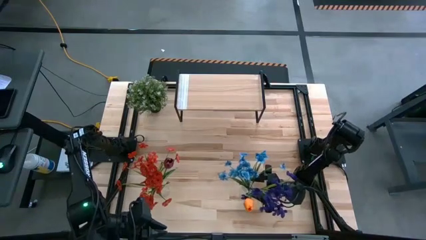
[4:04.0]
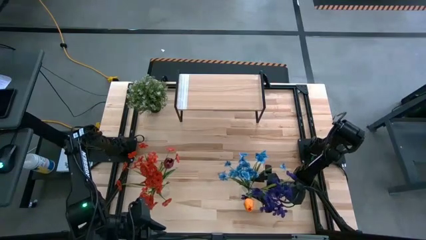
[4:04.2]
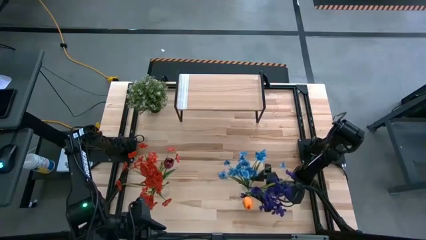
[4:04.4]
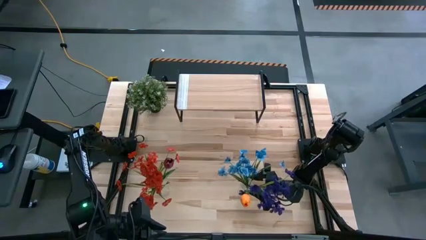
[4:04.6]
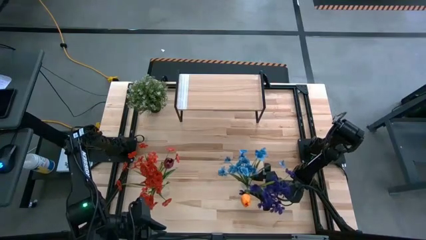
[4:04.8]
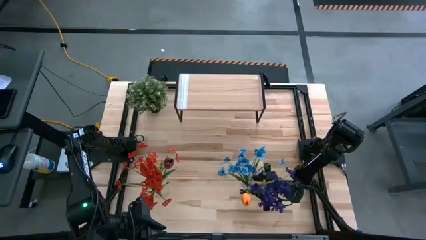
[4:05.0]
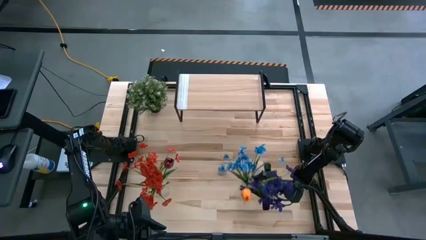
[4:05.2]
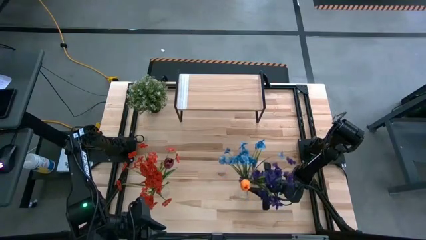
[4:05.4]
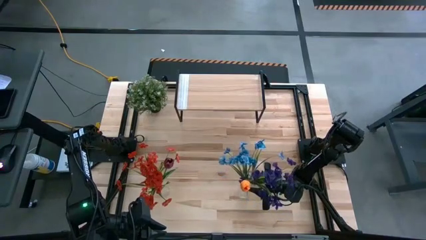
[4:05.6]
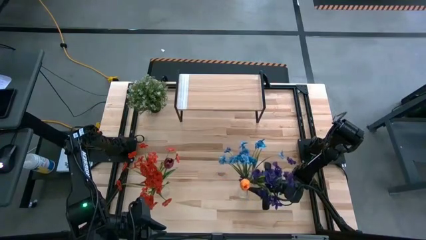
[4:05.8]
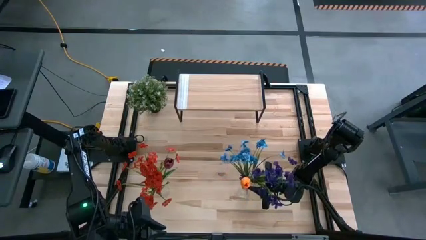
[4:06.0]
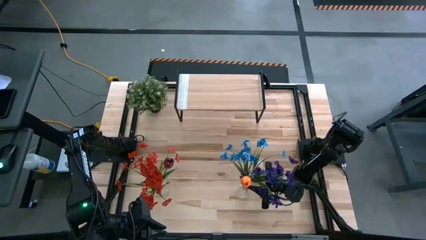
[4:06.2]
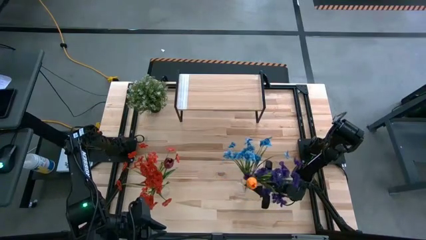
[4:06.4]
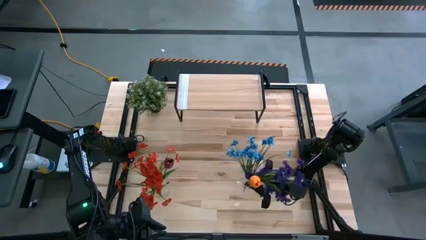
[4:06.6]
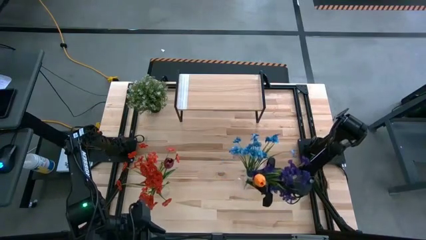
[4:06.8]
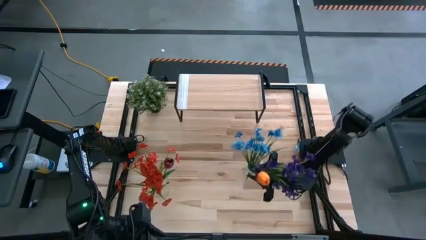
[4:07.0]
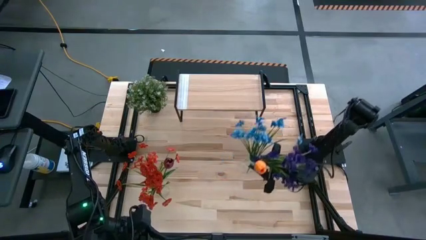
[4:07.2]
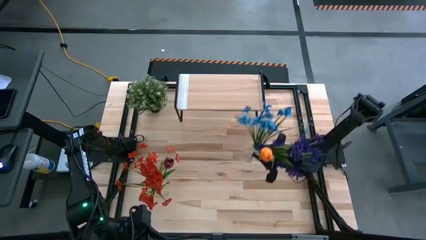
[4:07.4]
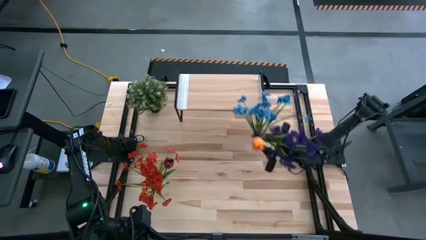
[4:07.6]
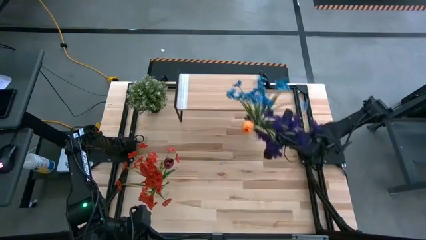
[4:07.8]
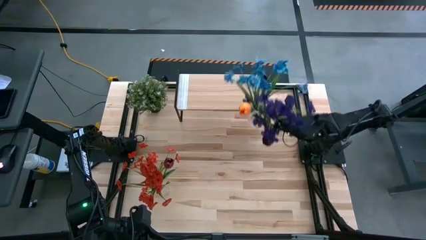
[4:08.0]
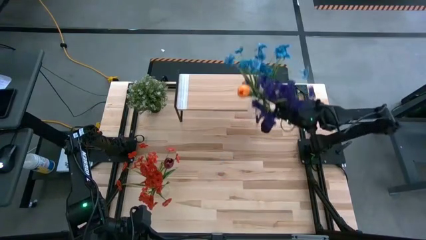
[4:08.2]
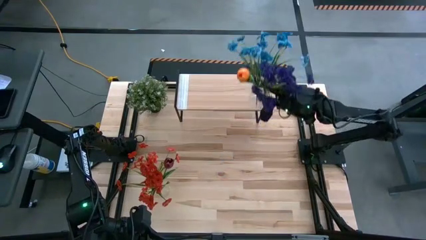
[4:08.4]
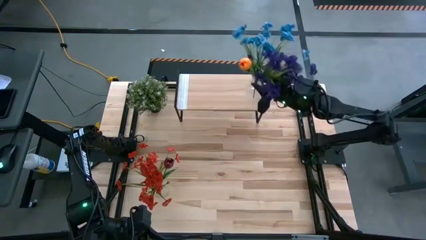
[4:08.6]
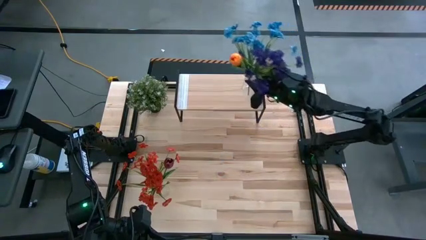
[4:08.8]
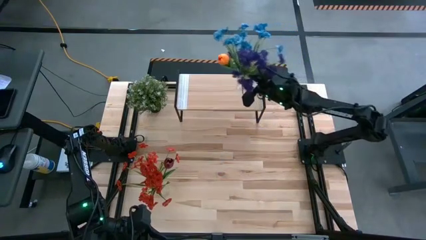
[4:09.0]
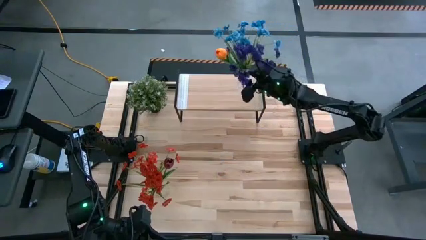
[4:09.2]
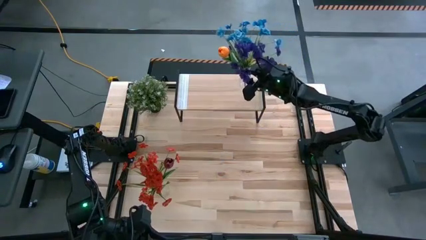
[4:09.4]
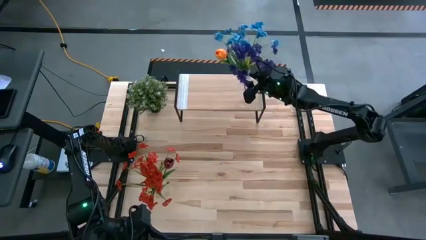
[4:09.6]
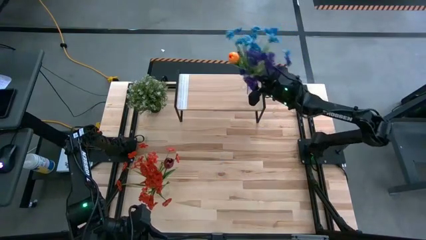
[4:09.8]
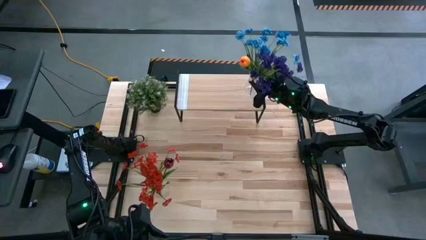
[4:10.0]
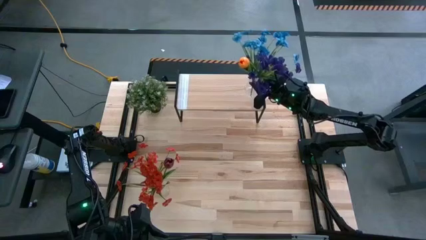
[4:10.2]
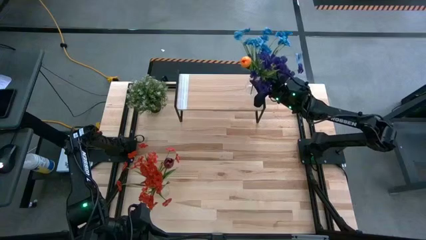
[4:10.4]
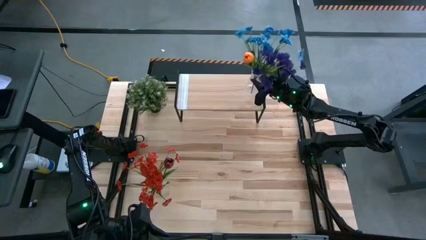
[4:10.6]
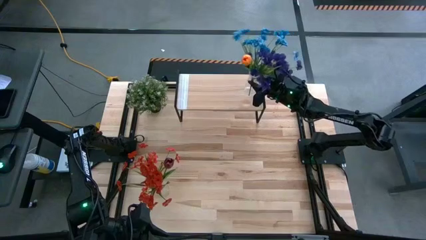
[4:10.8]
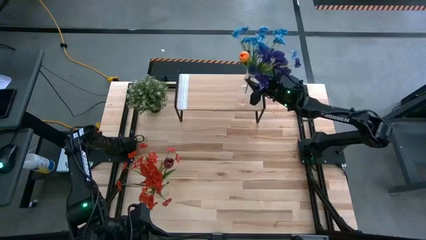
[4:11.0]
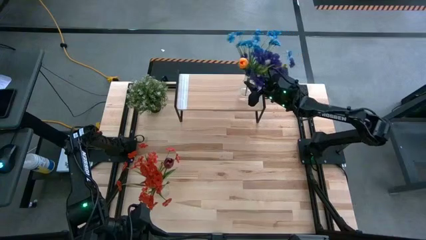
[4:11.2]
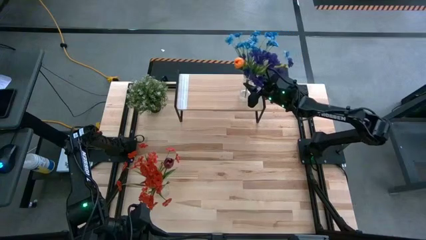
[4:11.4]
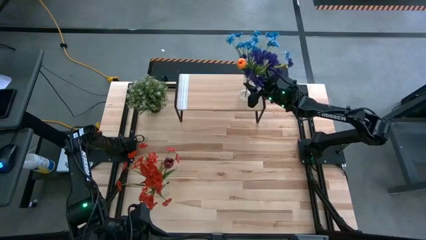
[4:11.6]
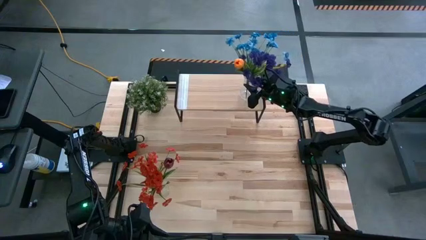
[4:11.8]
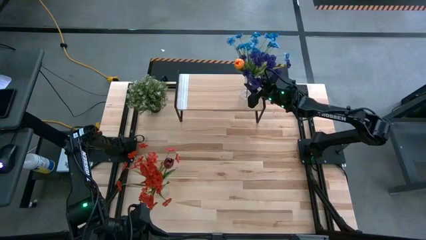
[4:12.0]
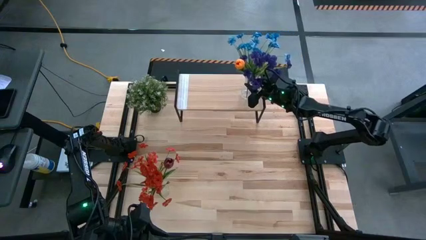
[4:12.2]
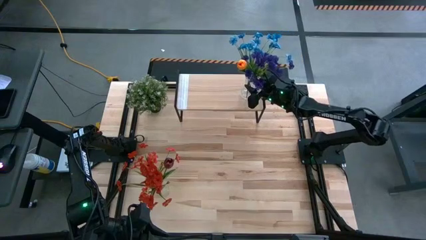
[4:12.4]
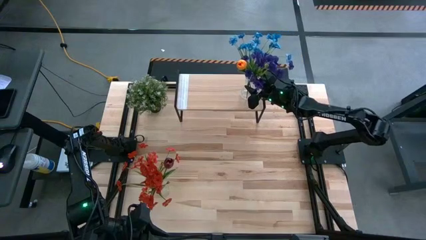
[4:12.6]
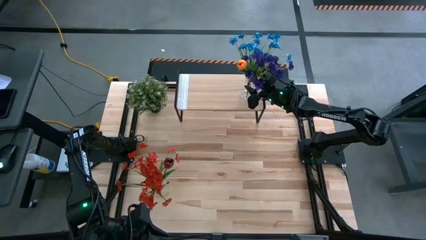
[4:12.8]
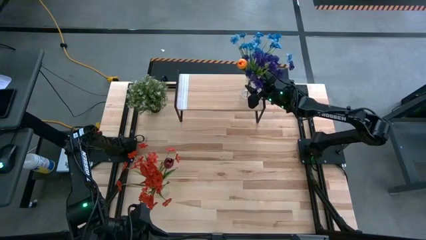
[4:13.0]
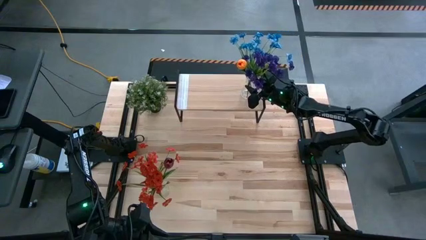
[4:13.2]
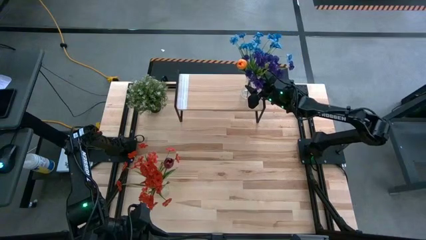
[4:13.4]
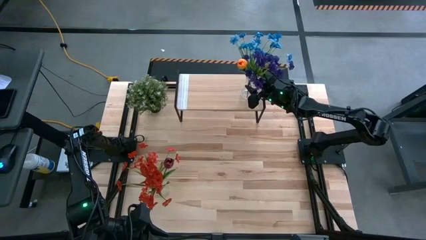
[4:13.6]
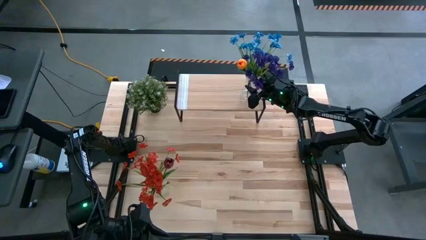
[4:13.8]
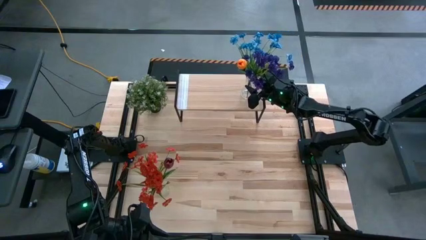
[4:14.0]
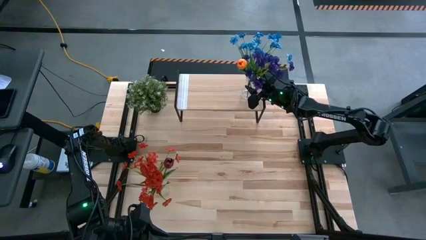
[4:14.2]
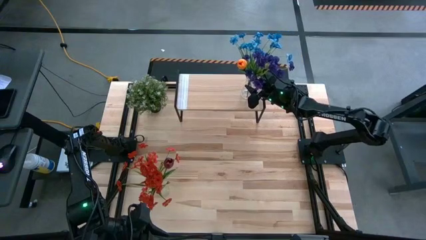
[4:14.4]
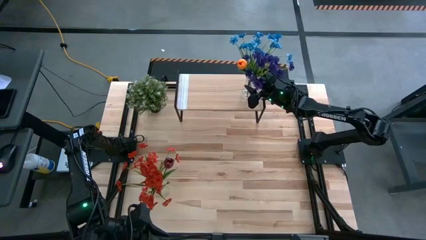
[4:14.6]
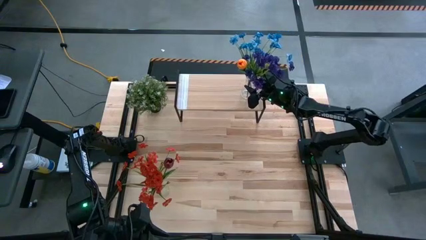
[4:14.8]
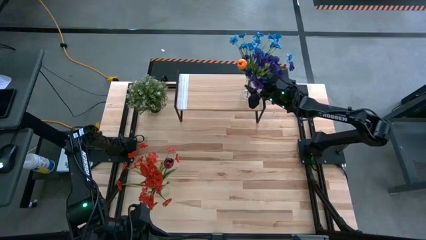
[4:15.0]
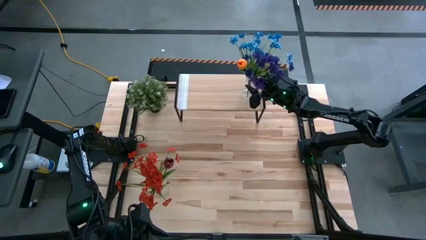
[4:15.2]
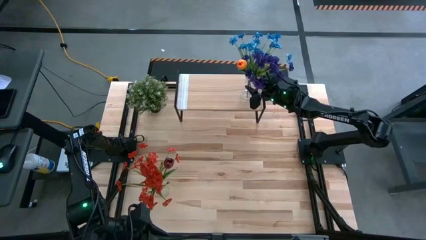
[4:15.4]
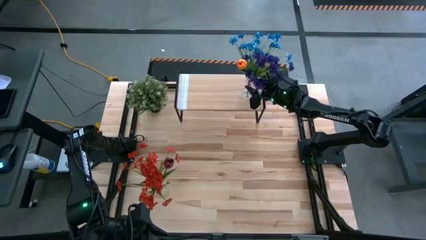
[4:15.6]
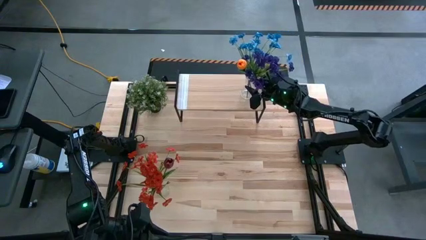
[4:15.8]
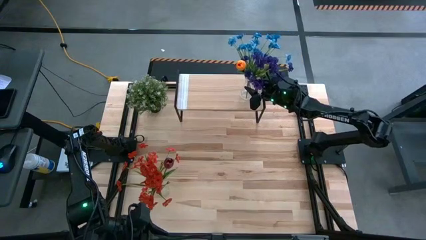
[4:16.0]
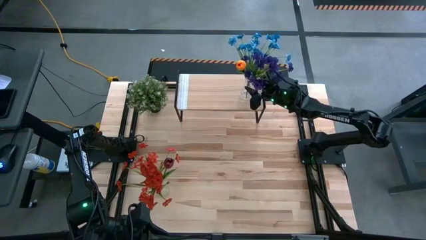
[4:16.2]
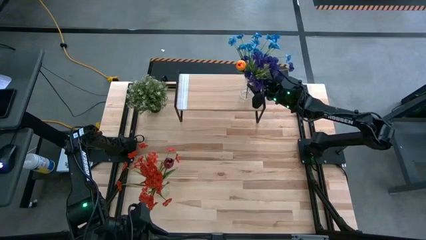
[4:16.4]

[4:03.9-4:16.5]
Task: Pick and place flowers into a vace then onto a shelf
Put the right transparent vase with flowers on the shelf
